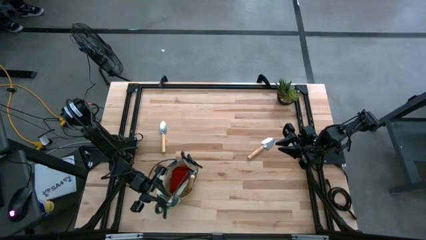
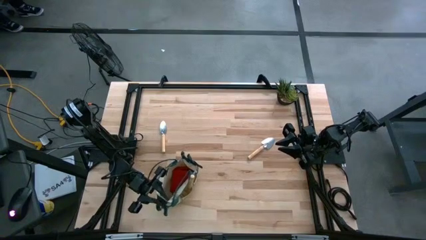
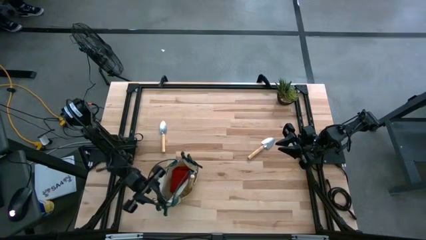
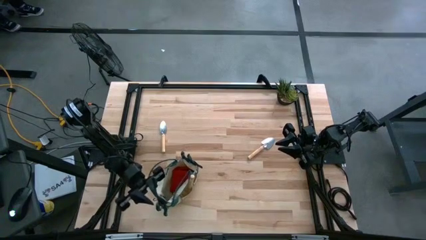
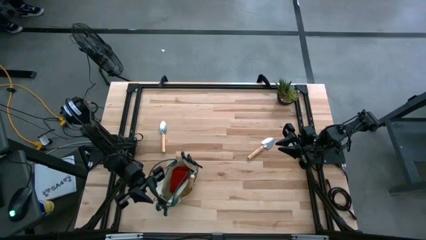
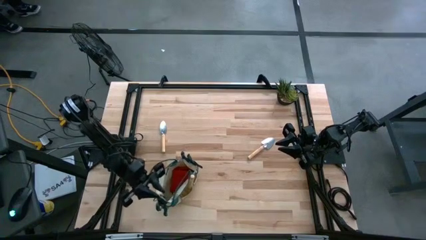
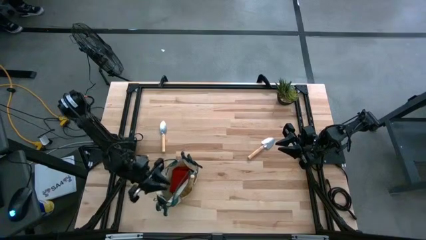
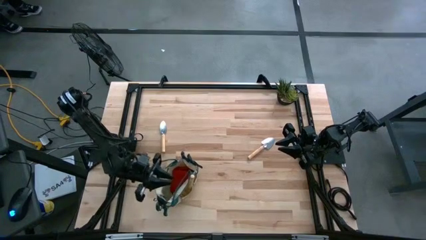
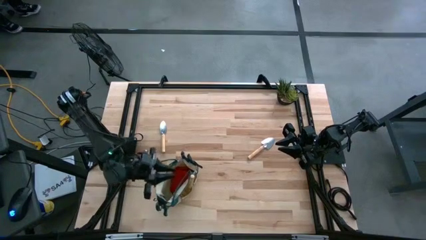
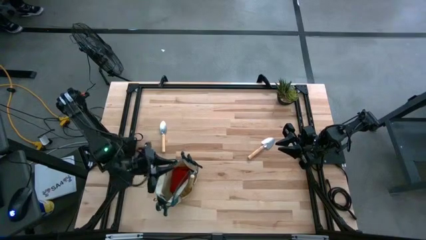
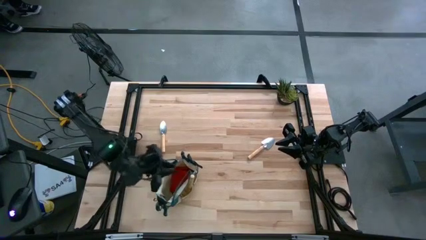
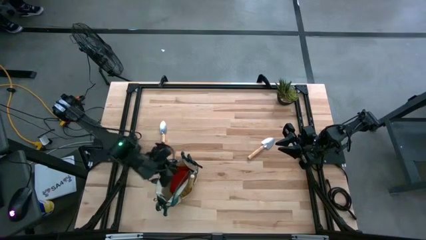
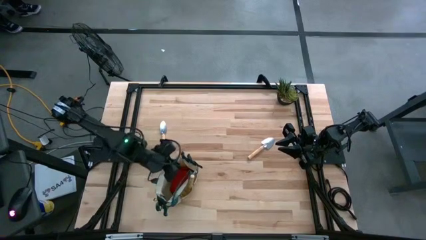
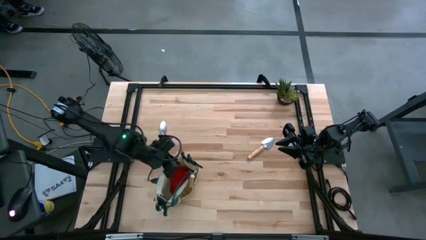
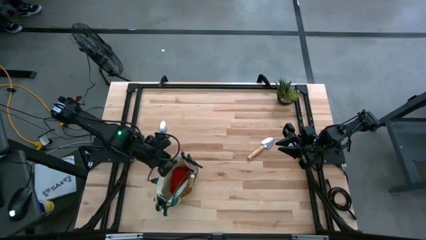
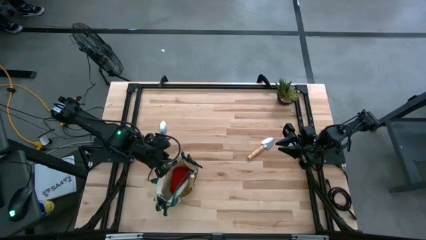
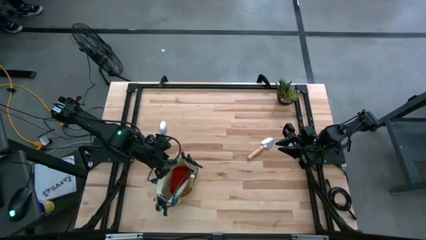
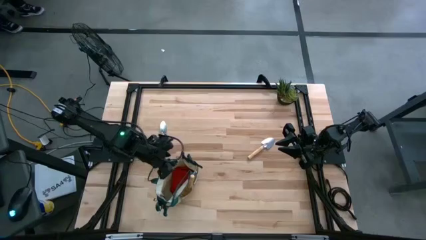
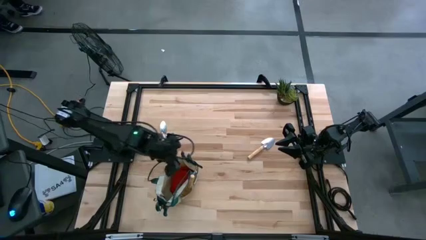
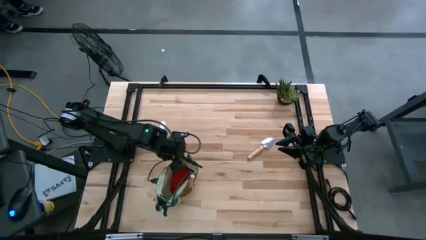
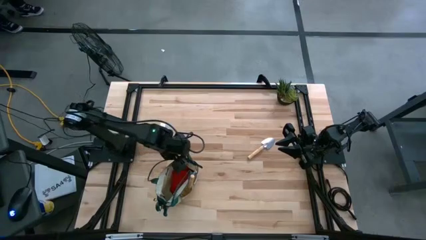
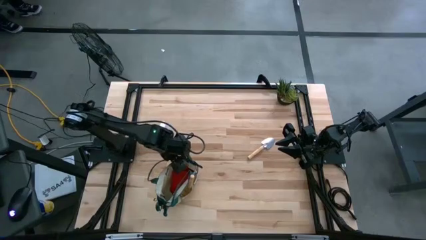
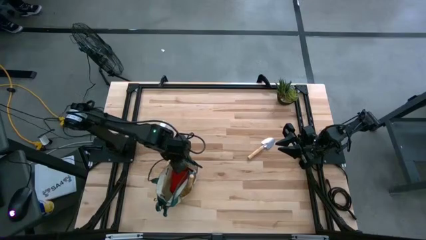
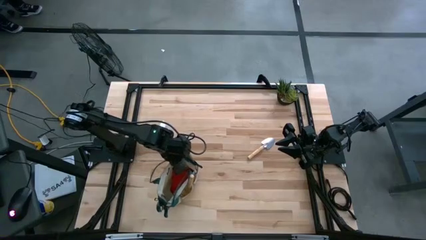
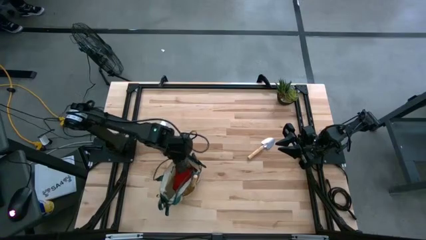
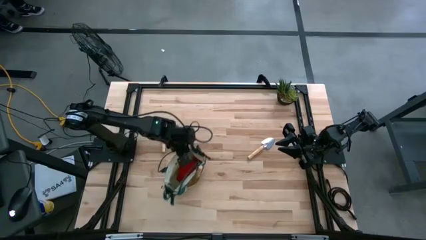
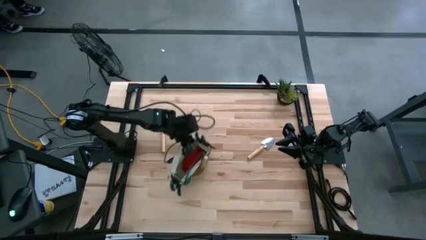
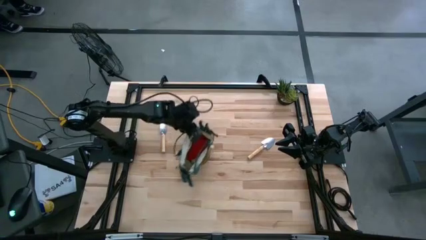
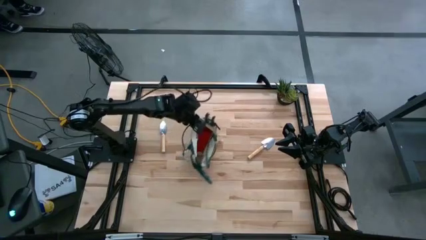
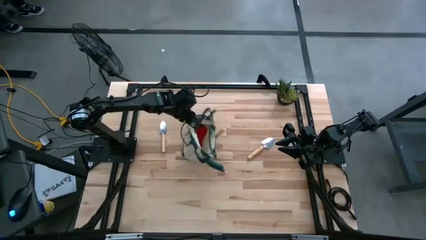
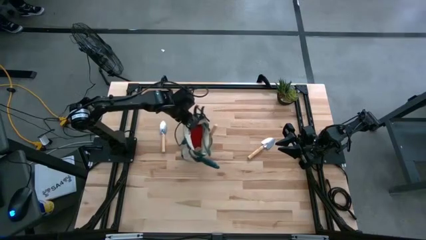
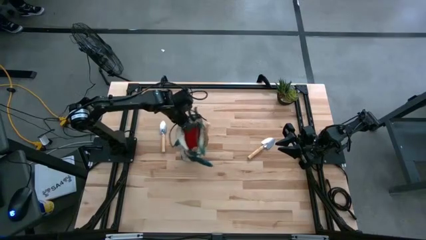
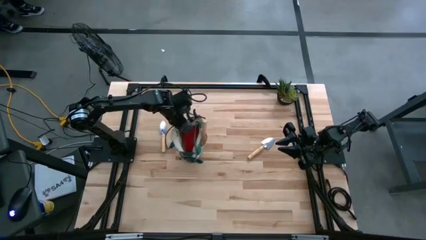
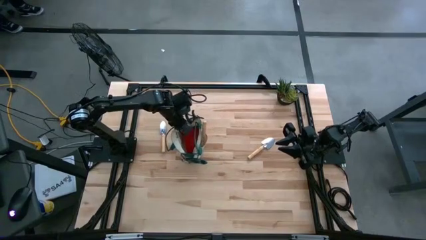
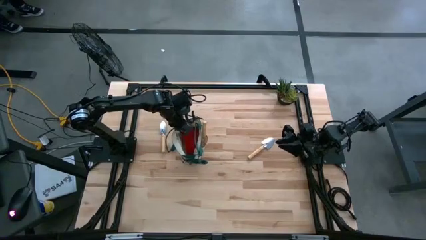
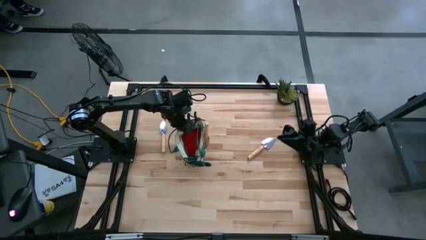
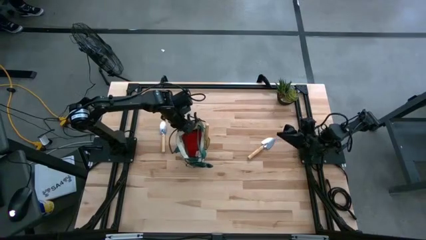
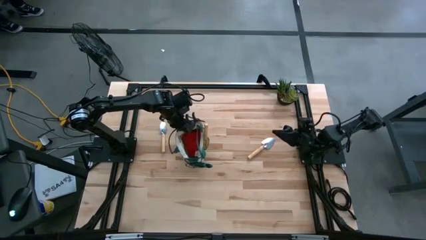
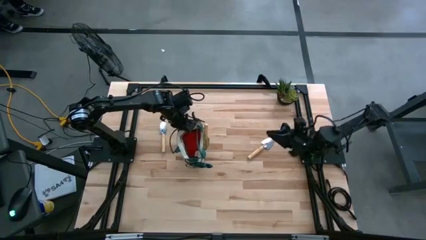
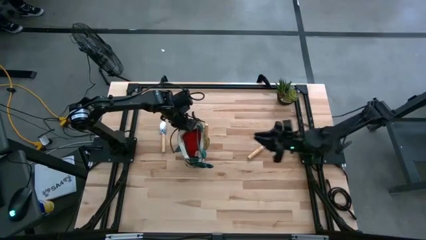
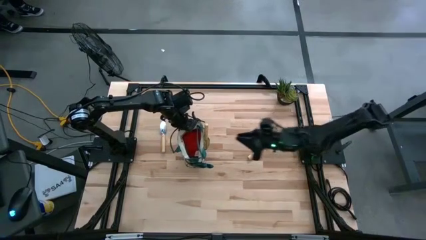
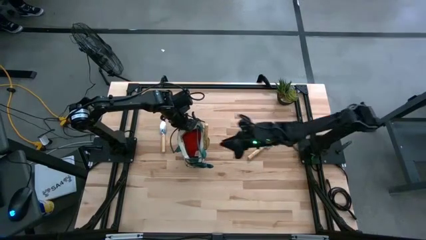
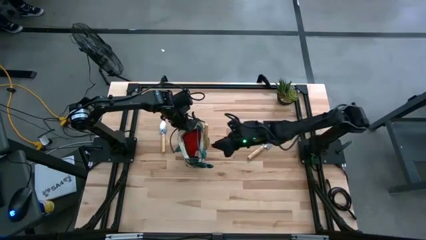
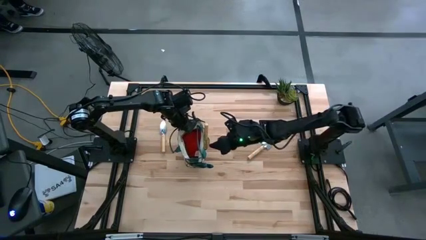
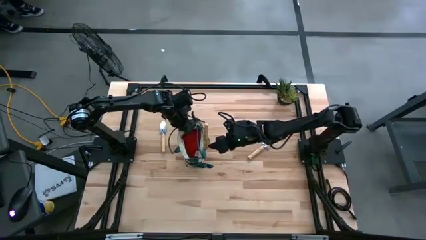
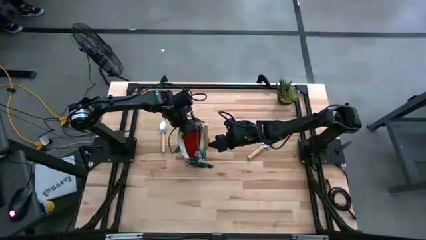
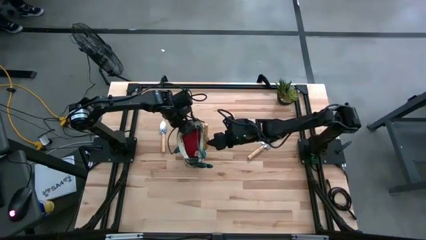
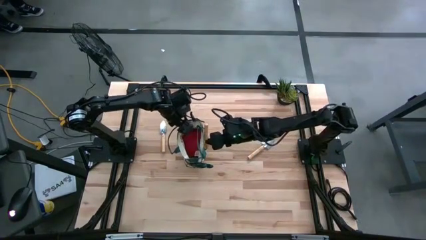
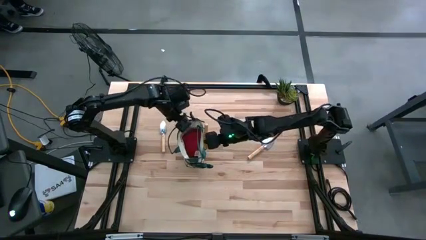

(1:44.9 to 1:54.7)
Task: Pick & Place Garden tools in Gardening bag
Move the gardening bag to the top center of the table

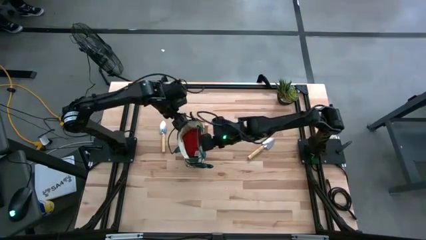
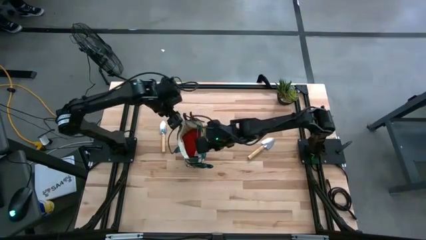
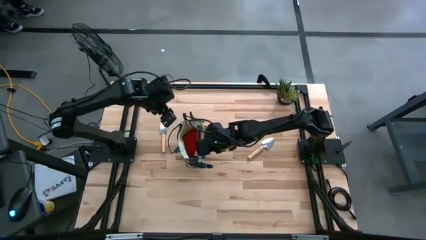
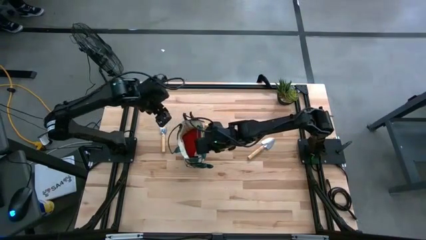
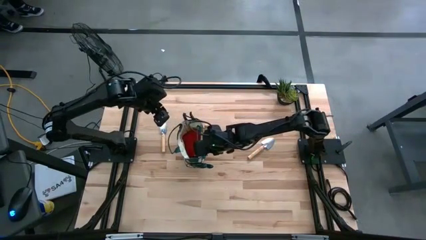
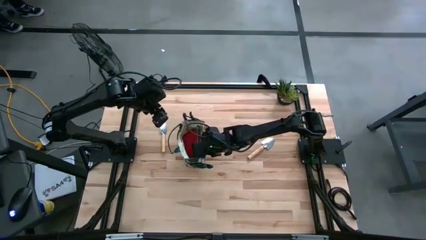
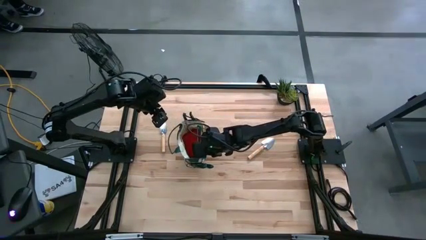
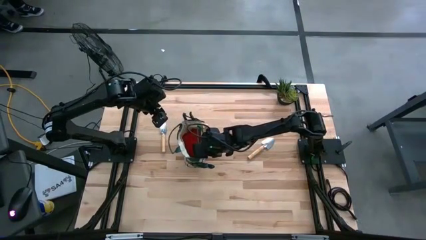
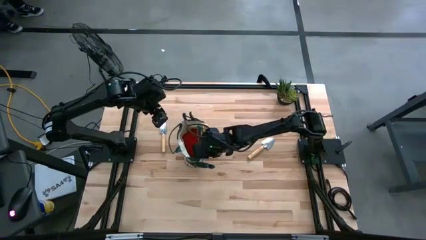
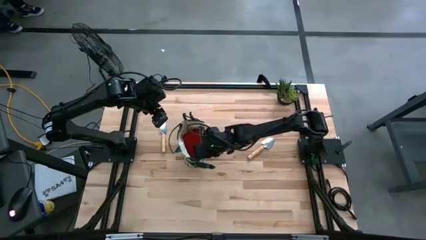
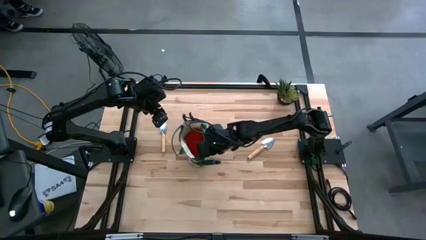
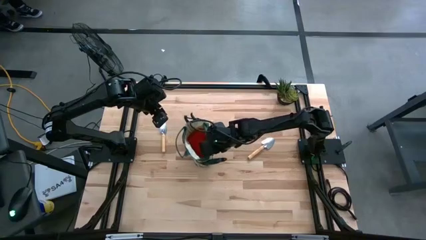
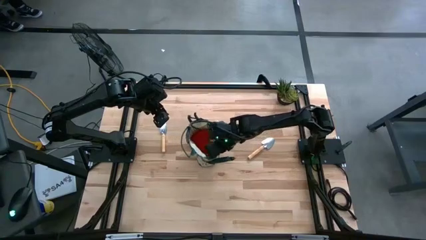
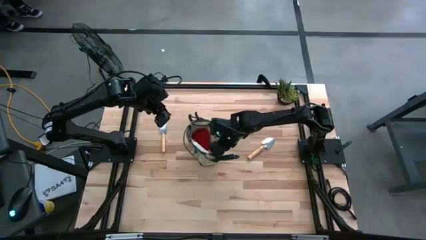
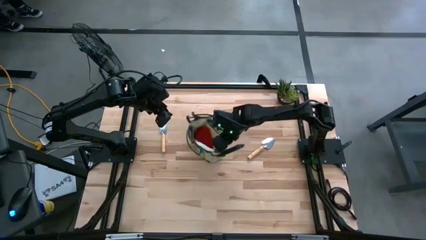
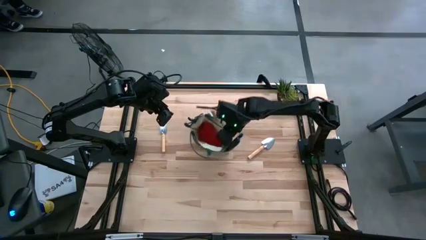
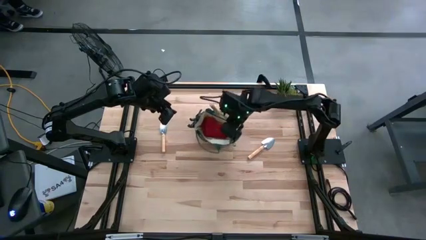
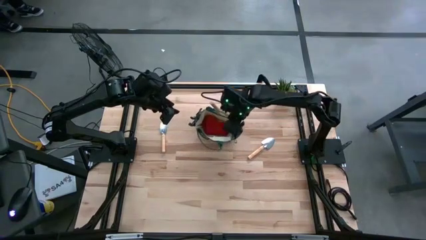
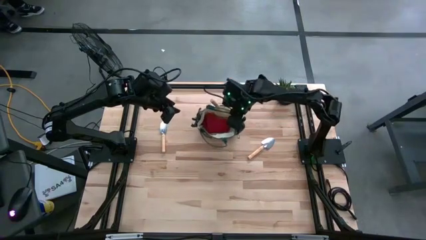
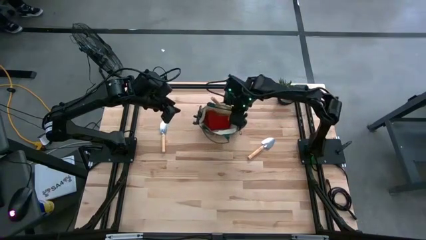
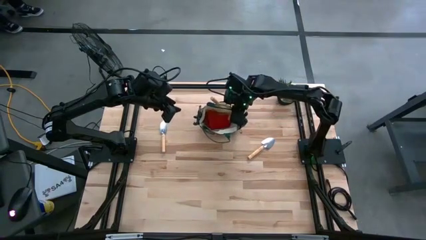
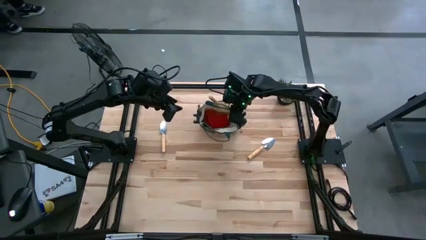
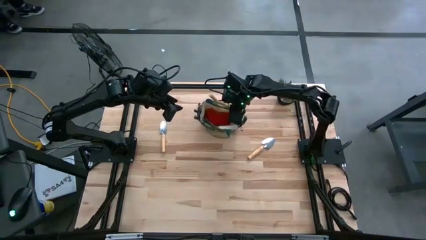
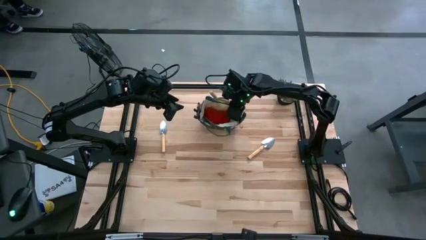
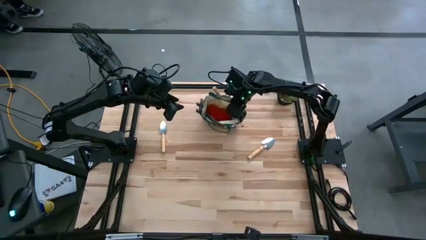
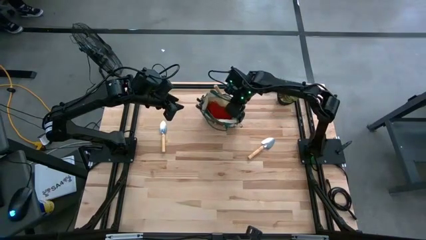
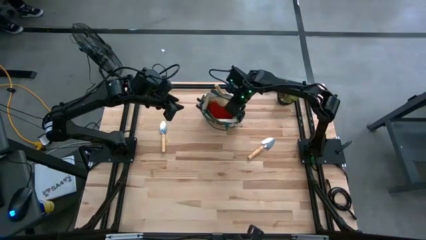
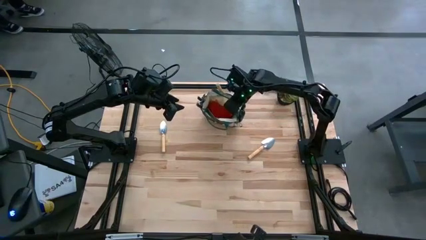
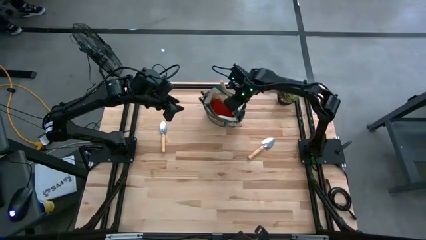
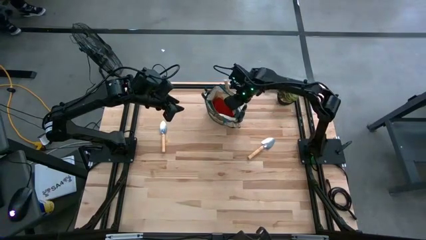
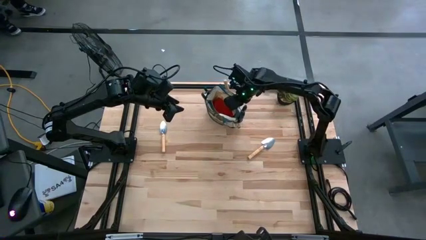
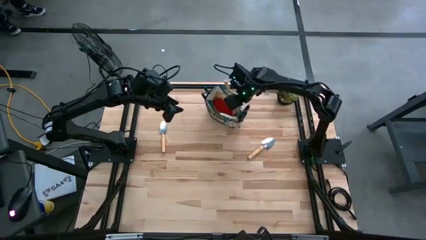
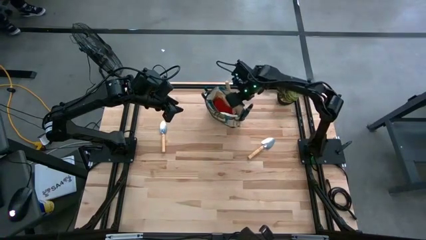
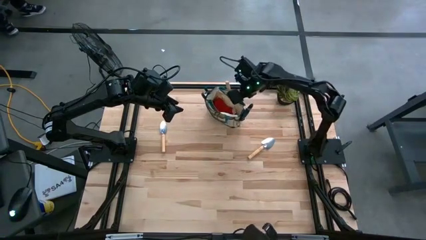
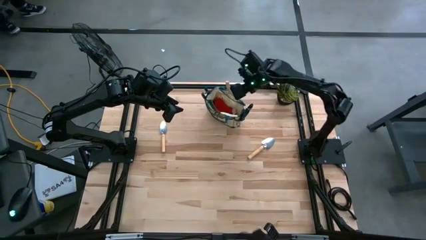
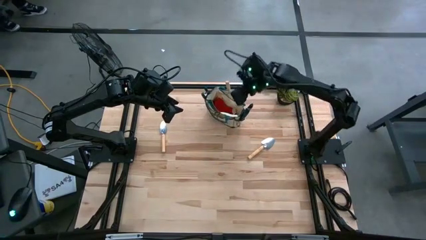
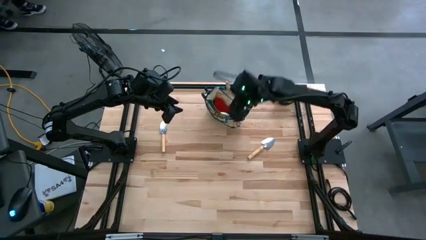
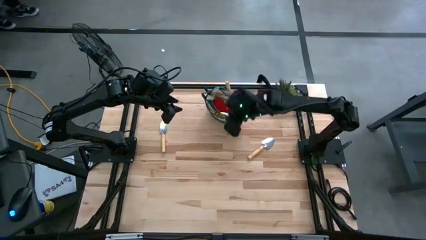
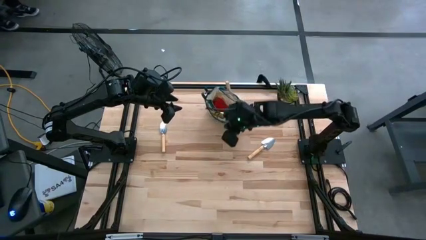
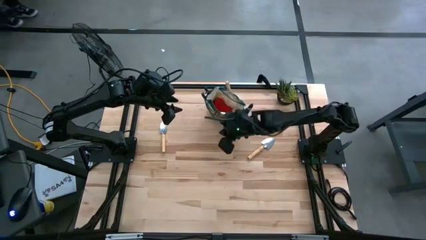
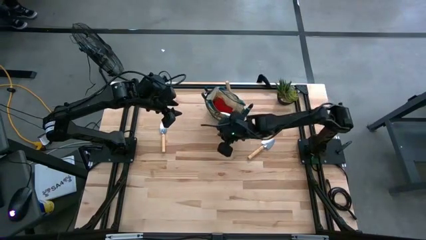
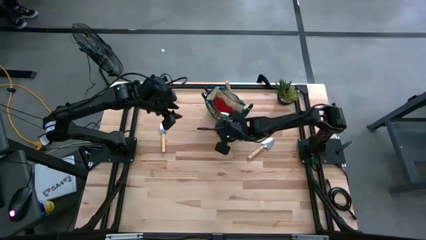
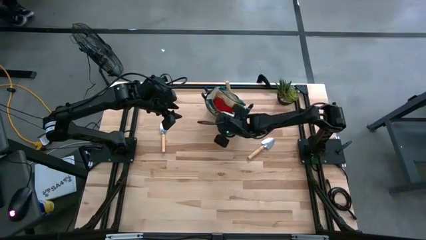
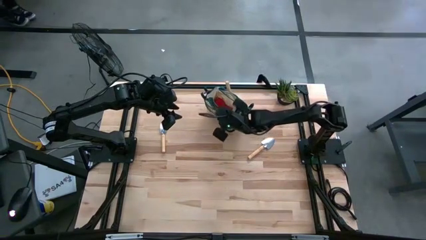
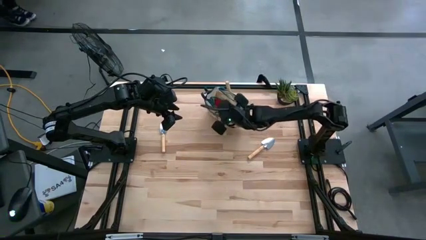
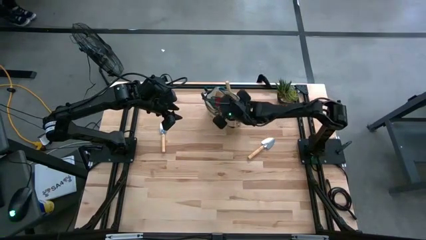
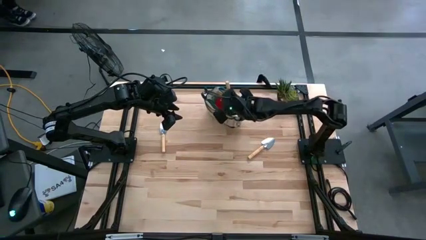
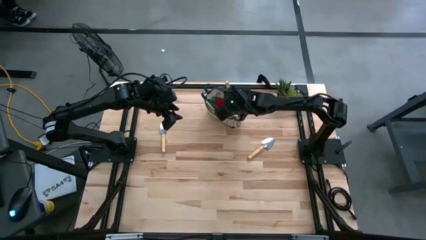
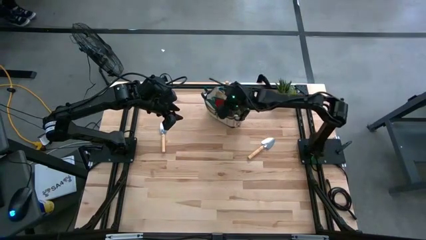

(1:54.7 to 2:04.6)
Move the gardening bag to the top center of the table
